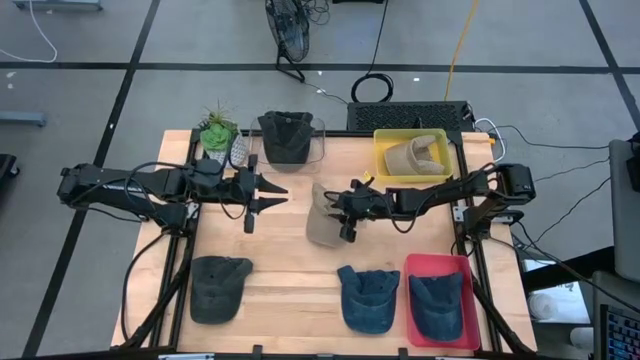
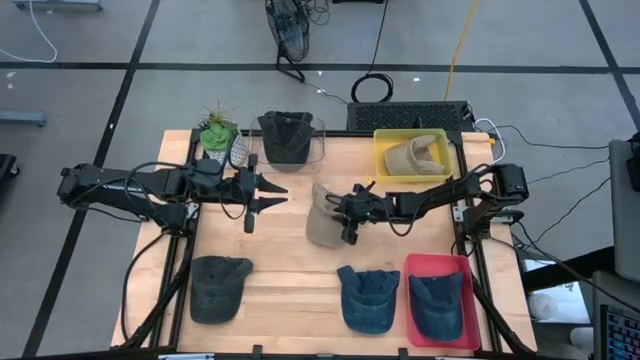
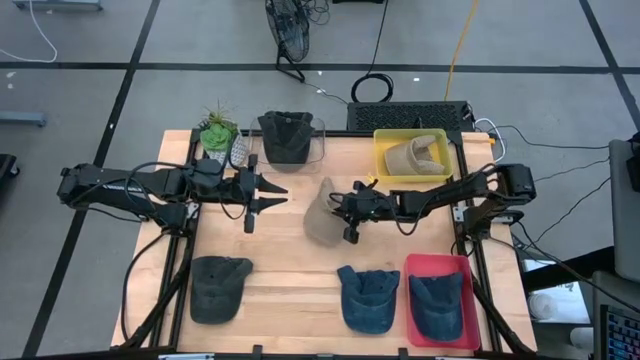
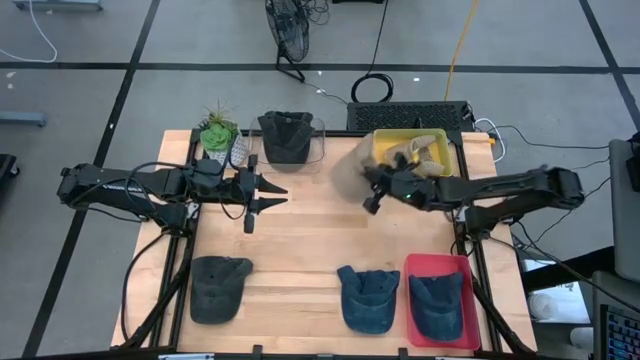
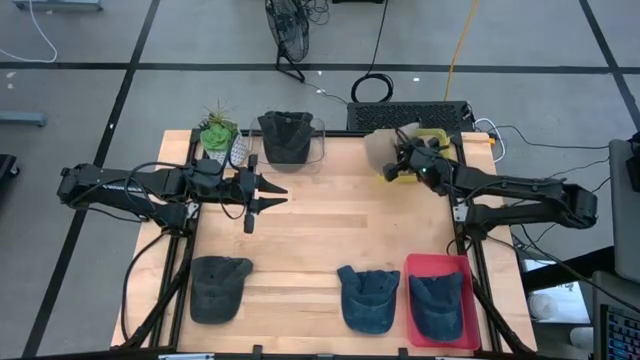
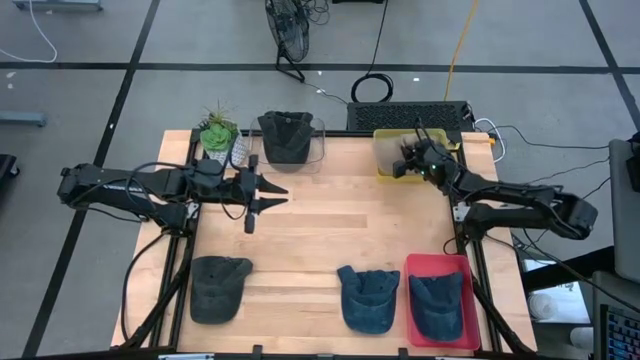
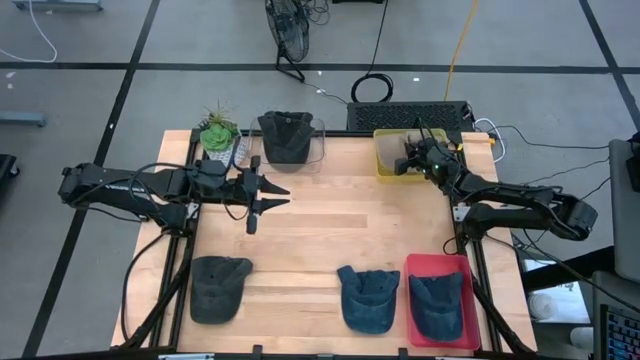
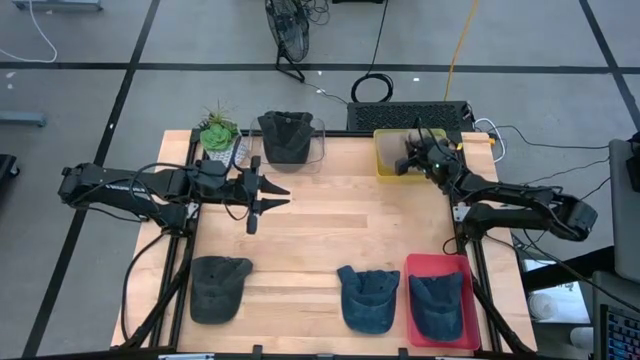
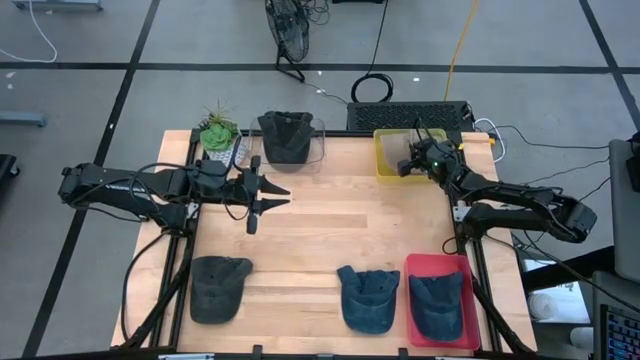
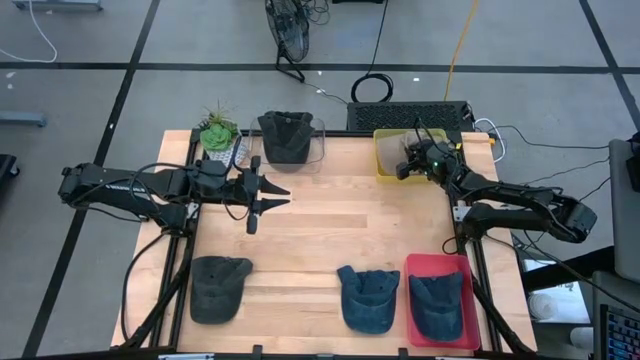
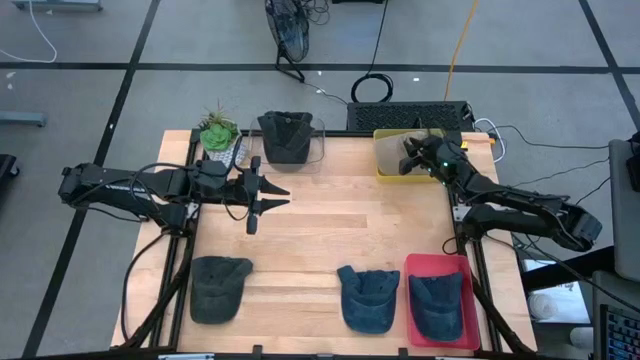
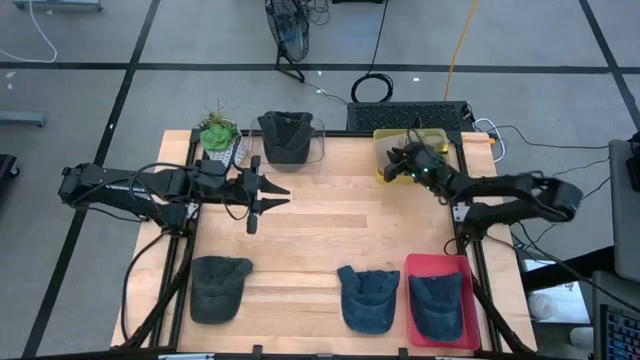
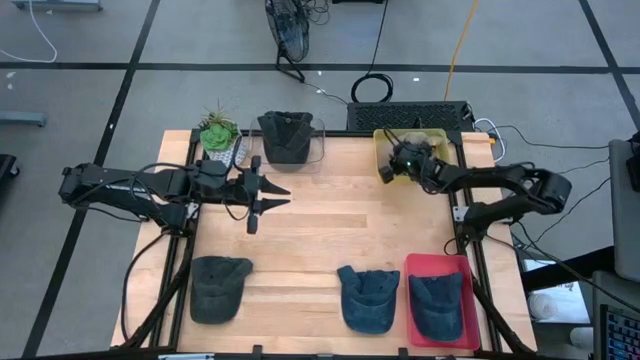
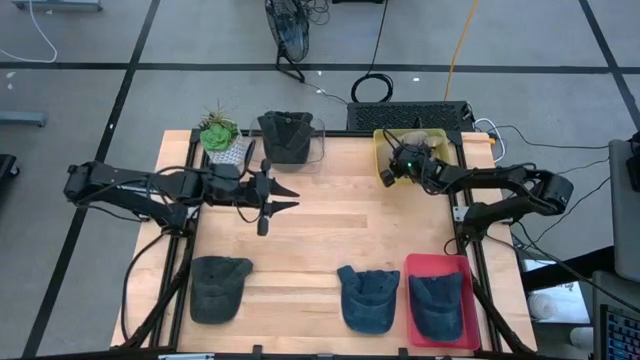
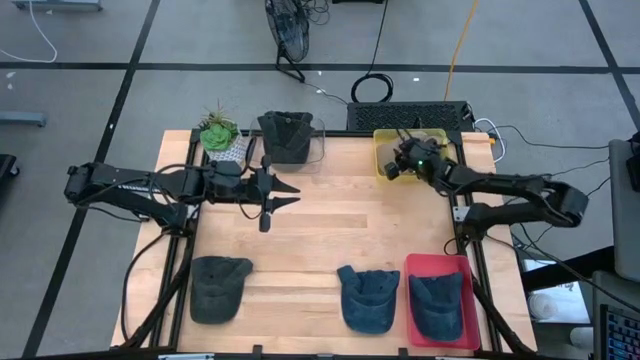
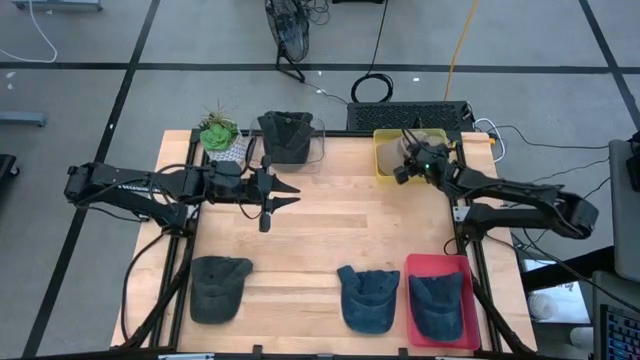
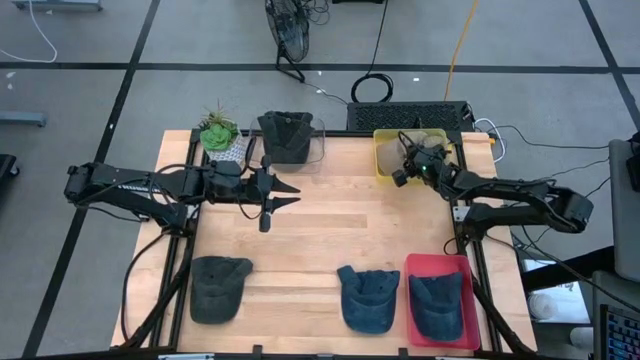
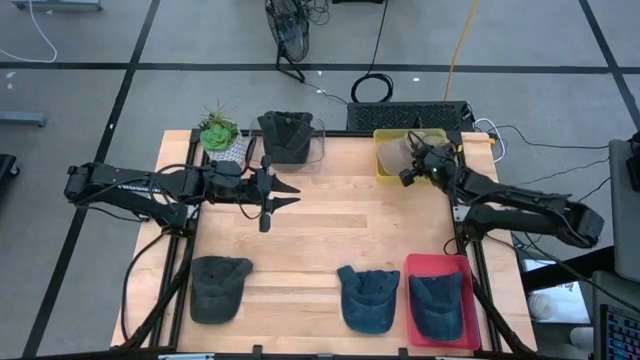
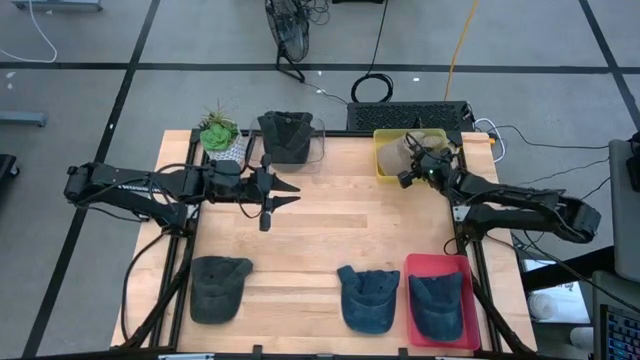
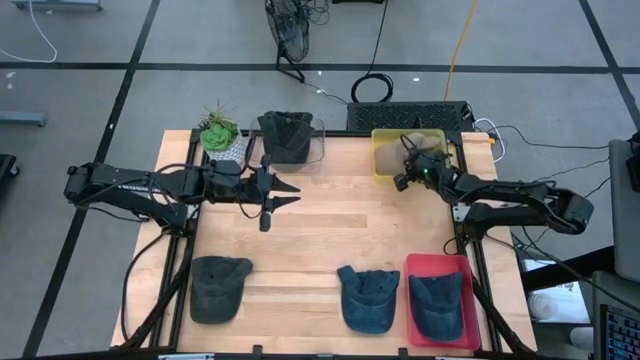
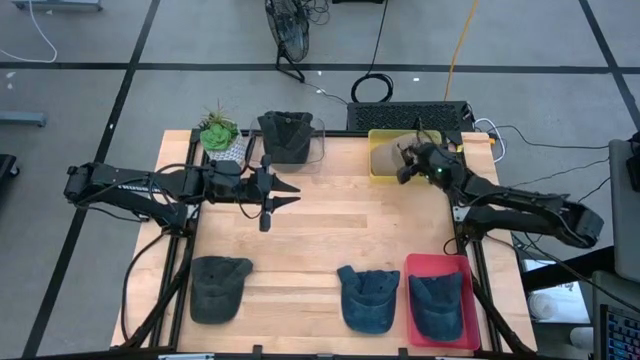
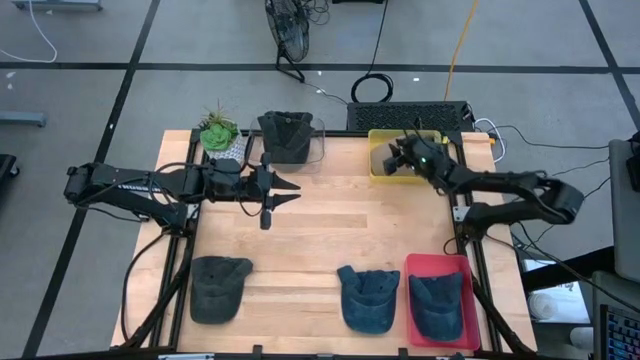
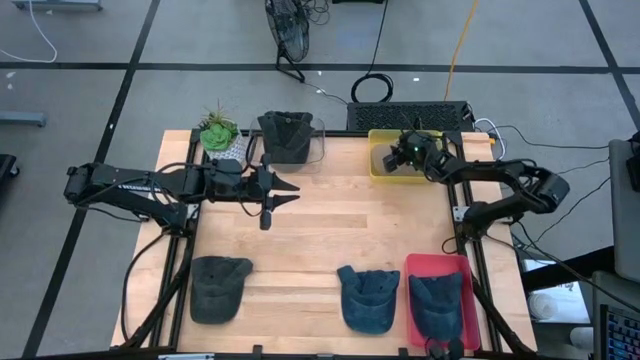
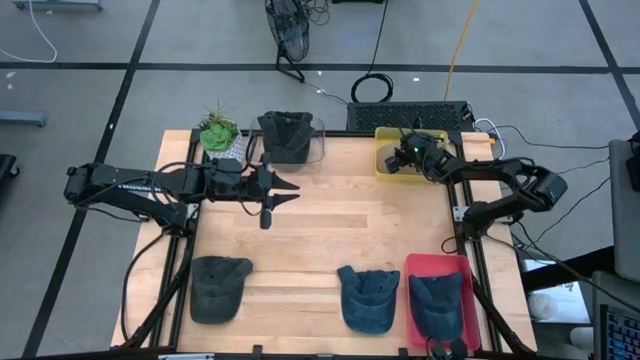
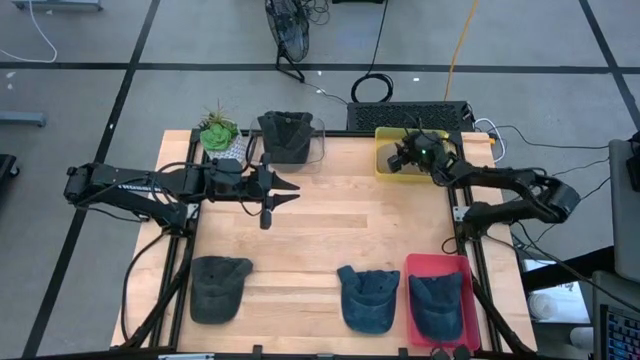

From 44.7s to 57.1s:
Task: Pick & Place hat
Put the brown cap into the yellow bin

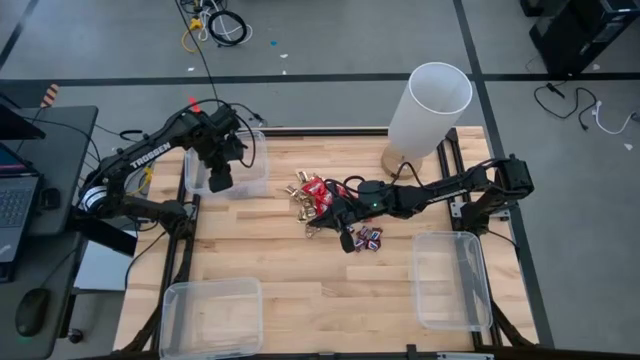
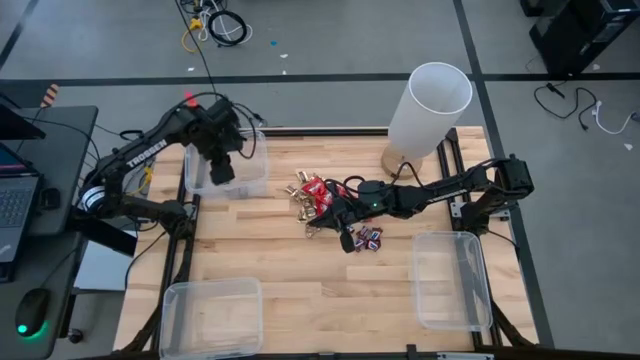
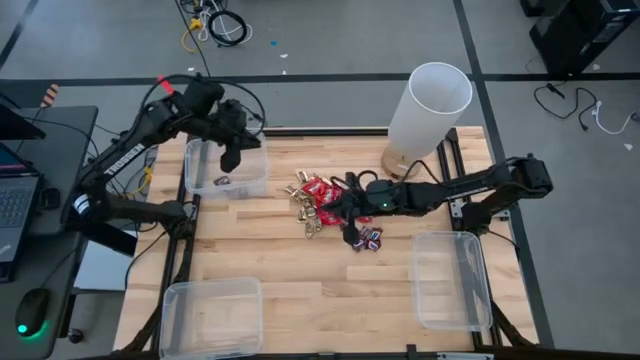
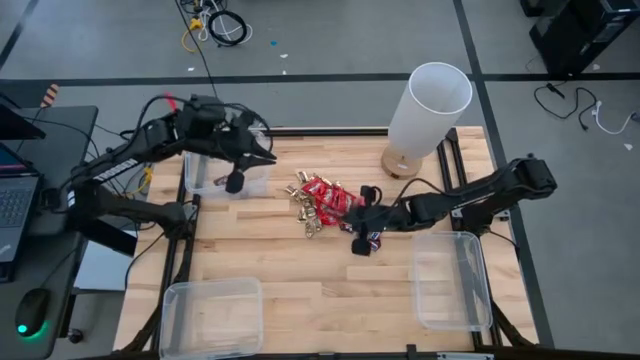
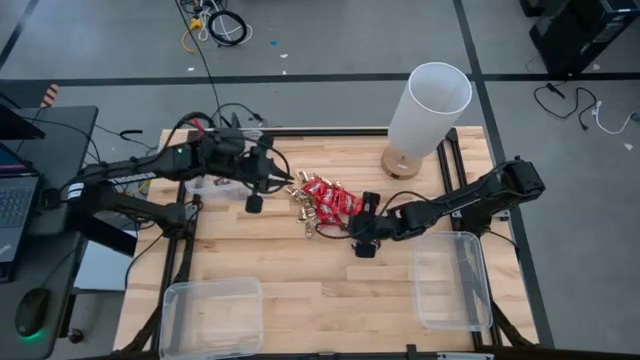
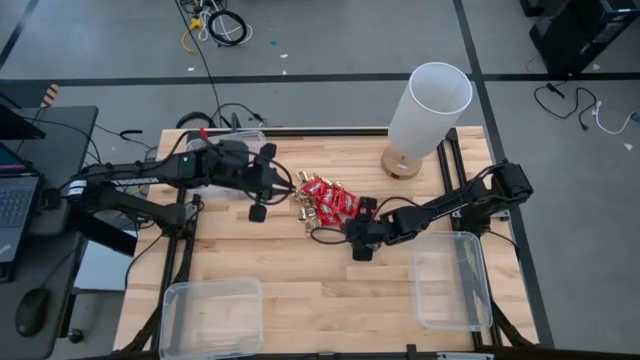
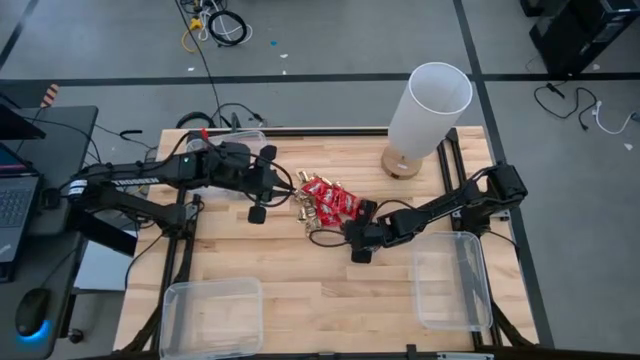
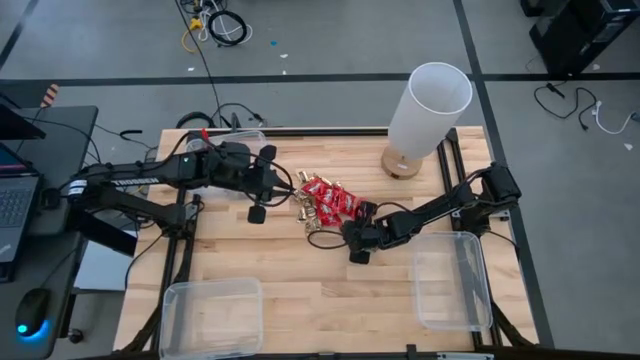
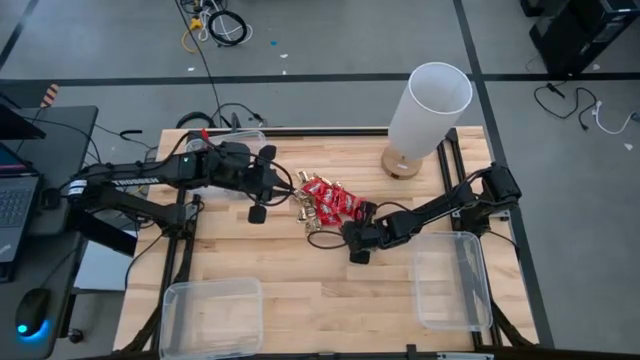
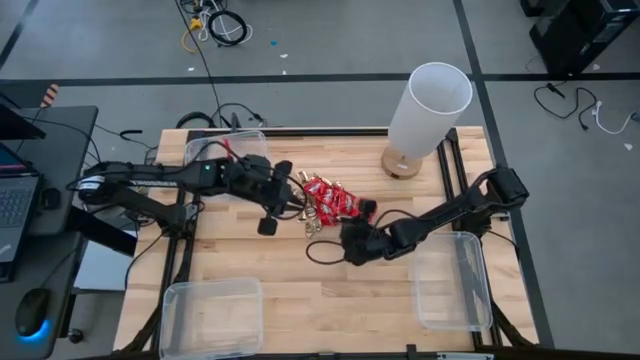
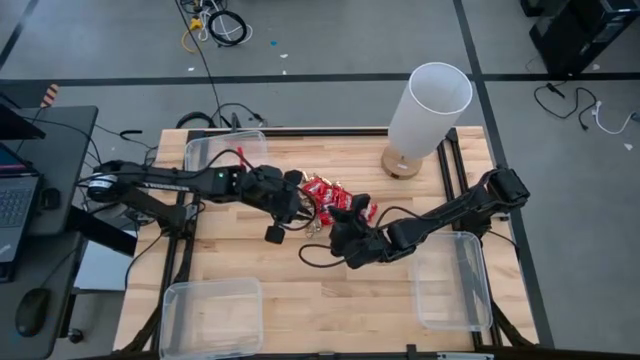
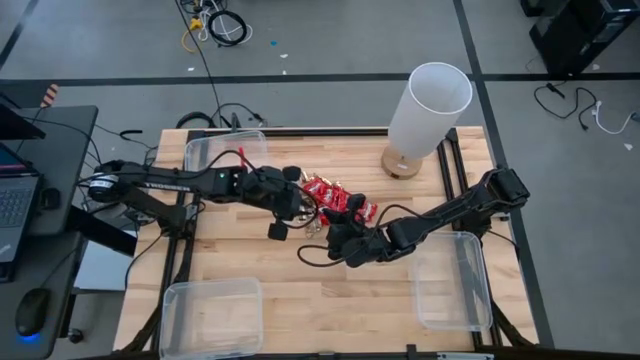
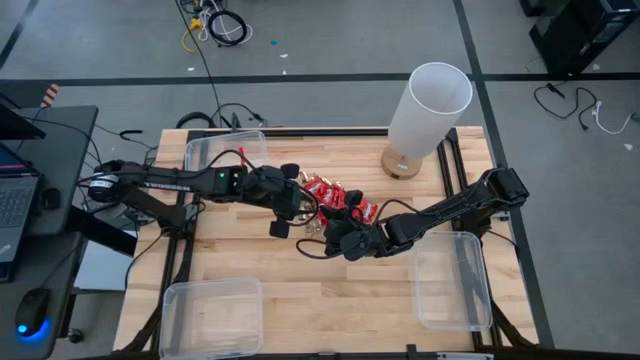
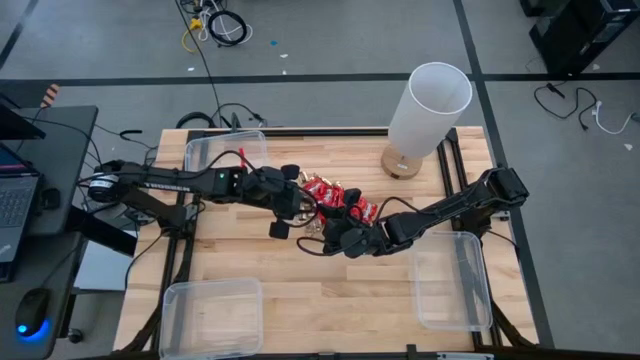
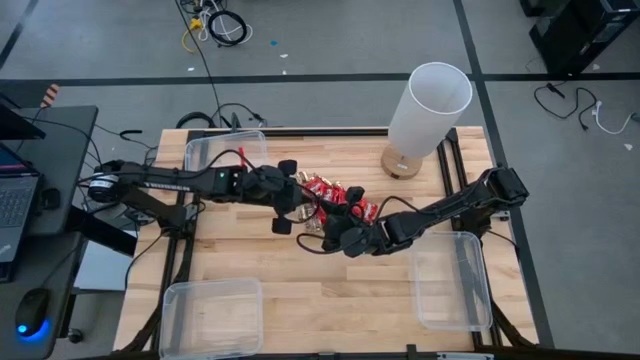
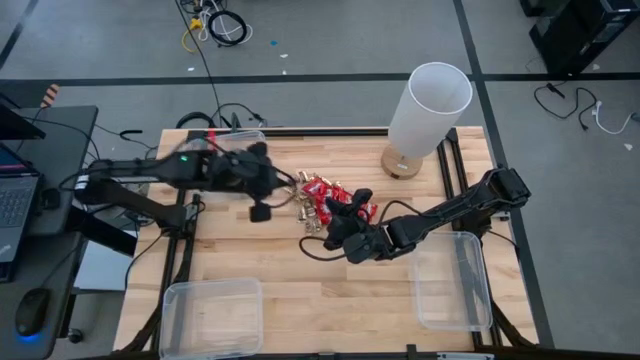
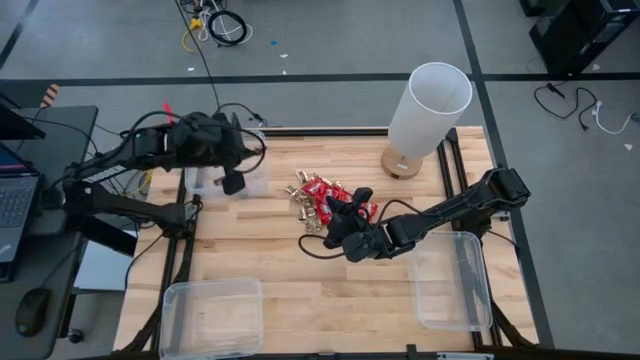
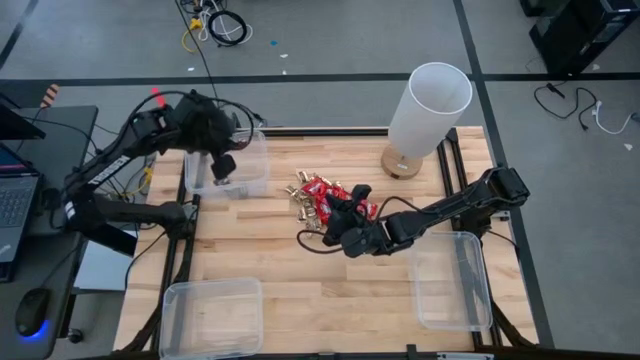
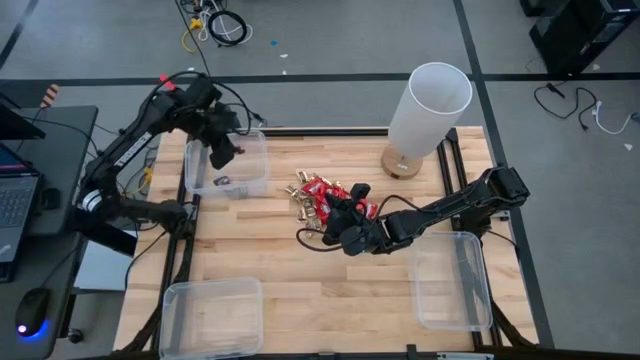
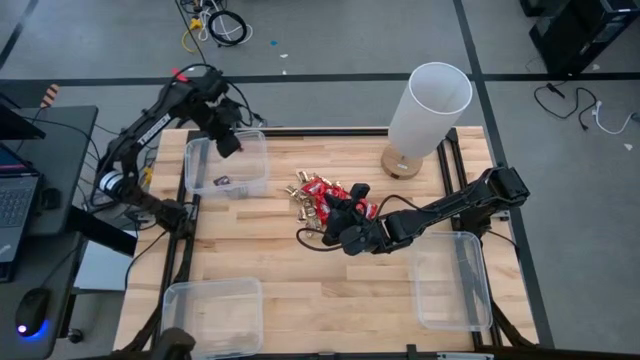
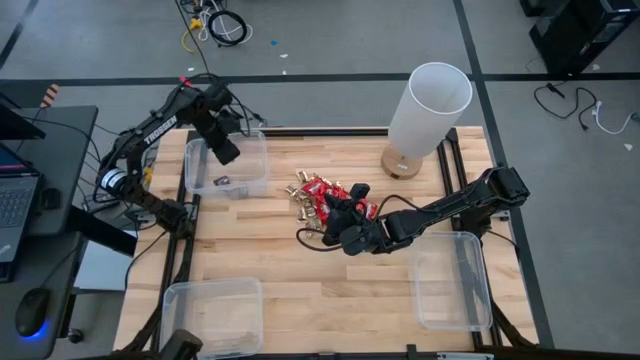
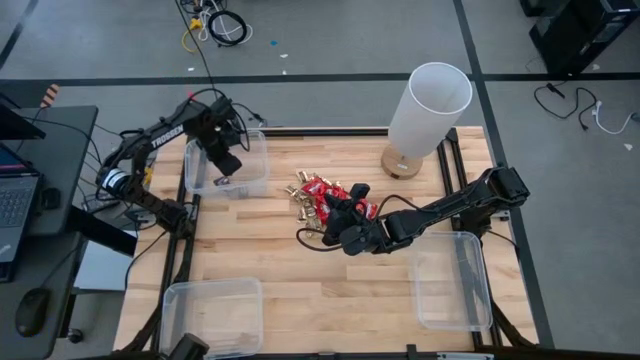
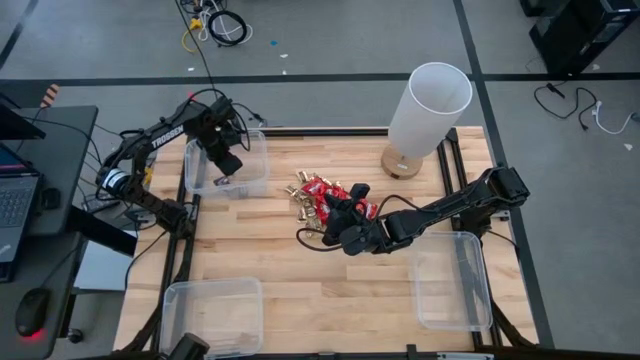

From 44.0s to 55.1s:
Task: Sort candy
Put the brown chocolate into the top left transparent bin
